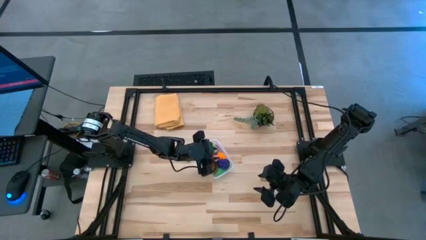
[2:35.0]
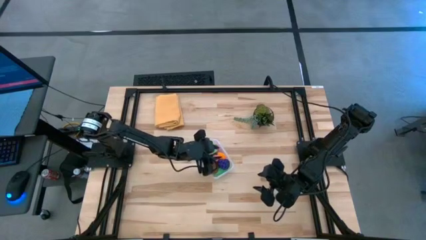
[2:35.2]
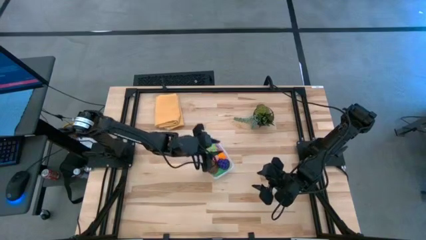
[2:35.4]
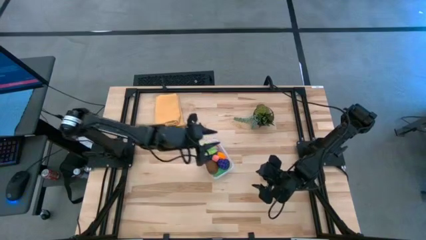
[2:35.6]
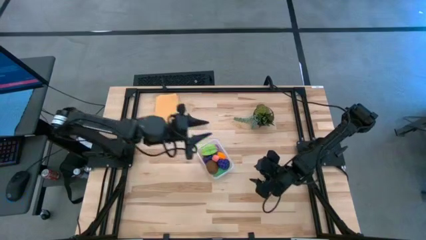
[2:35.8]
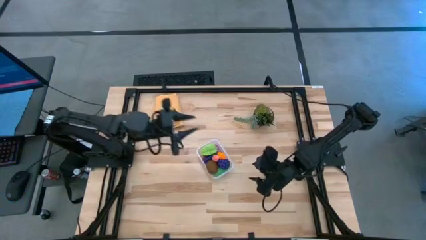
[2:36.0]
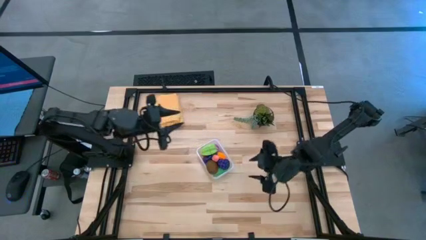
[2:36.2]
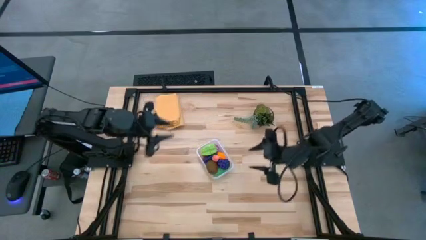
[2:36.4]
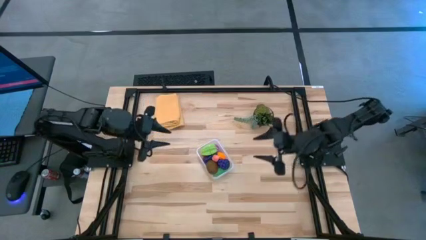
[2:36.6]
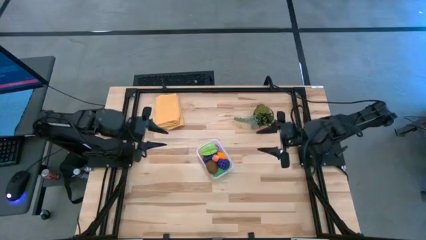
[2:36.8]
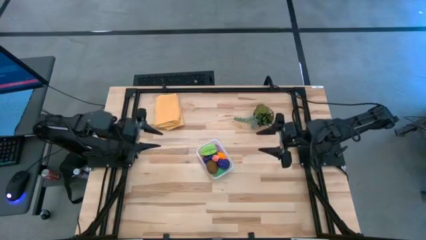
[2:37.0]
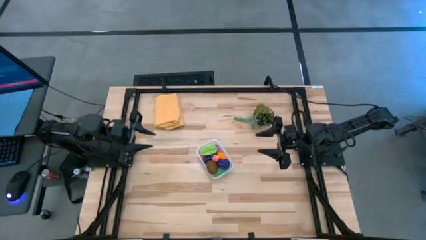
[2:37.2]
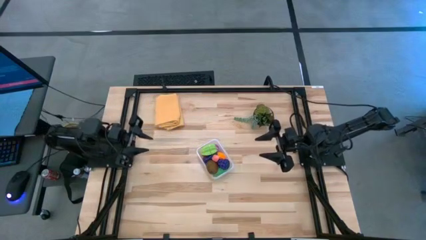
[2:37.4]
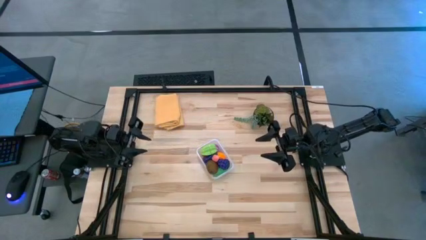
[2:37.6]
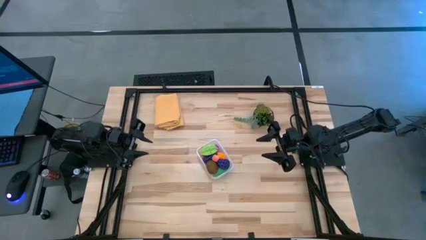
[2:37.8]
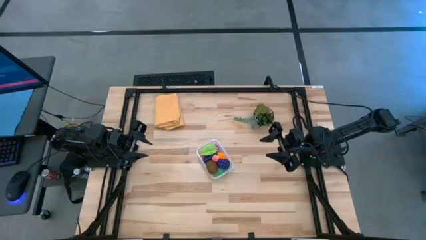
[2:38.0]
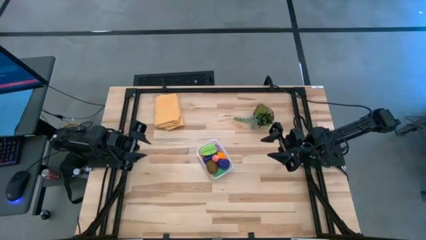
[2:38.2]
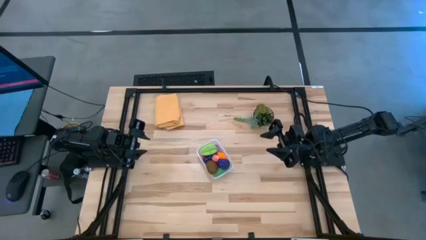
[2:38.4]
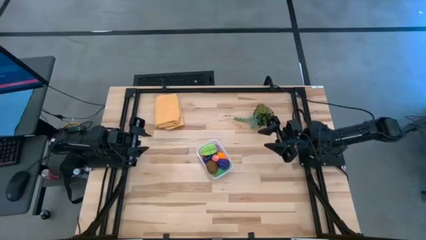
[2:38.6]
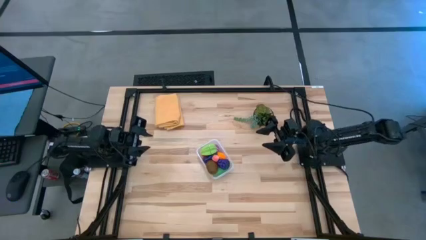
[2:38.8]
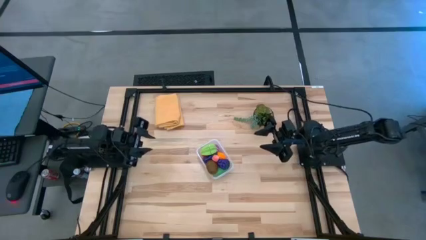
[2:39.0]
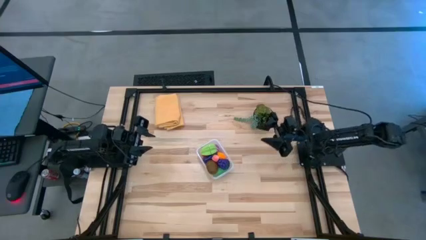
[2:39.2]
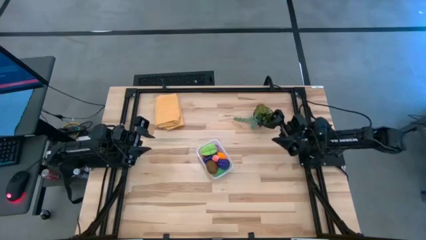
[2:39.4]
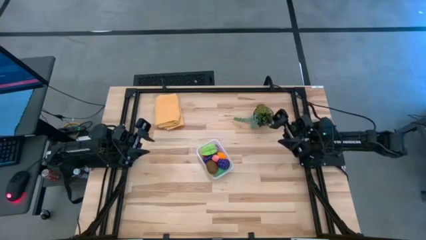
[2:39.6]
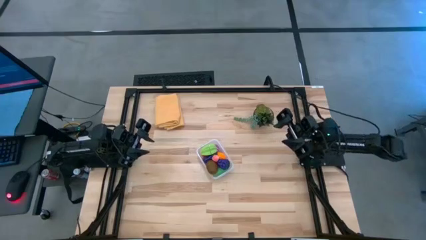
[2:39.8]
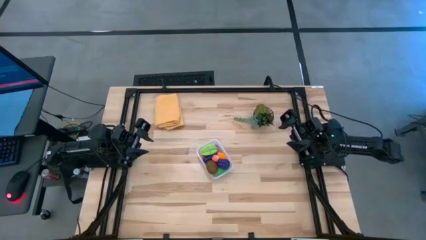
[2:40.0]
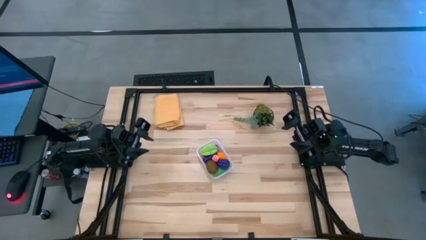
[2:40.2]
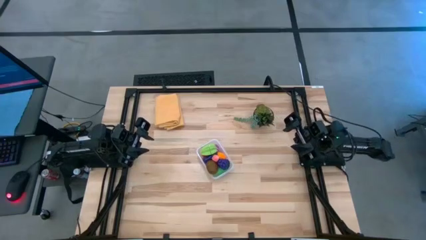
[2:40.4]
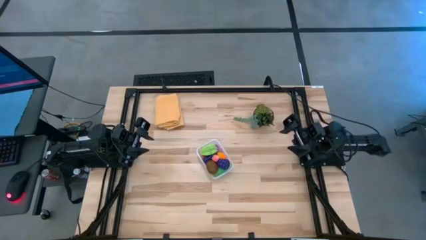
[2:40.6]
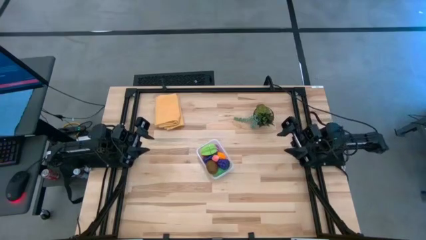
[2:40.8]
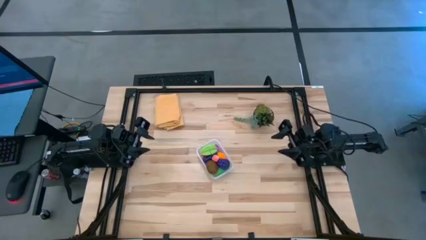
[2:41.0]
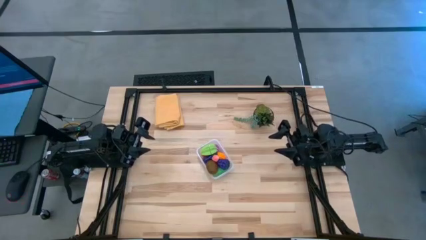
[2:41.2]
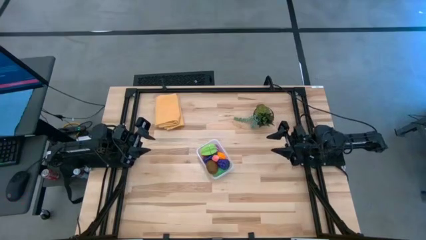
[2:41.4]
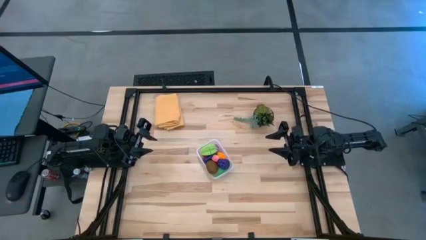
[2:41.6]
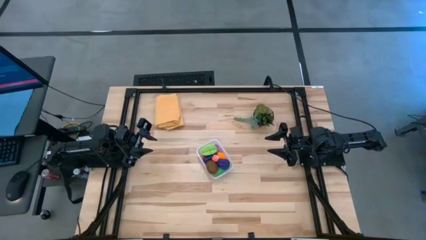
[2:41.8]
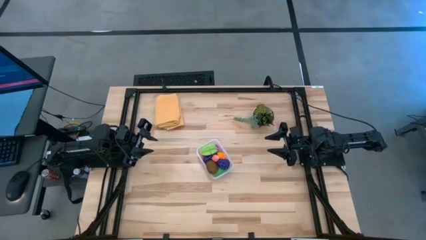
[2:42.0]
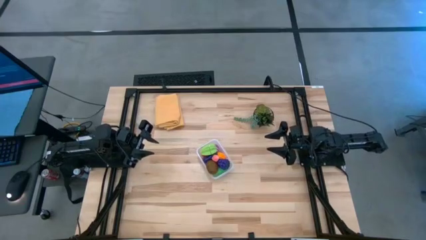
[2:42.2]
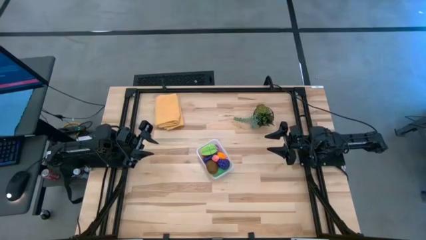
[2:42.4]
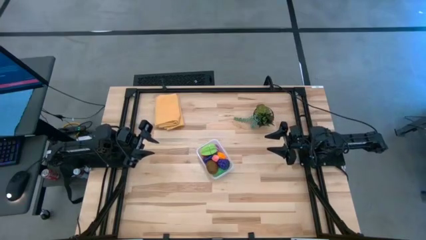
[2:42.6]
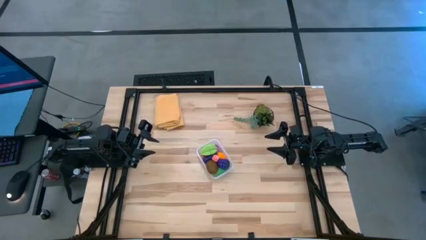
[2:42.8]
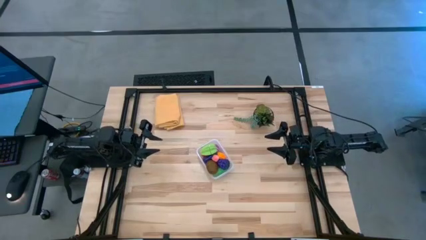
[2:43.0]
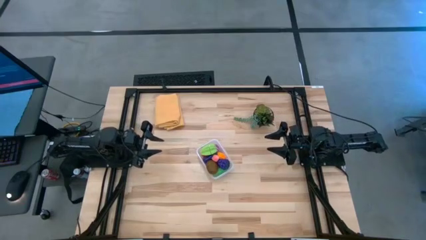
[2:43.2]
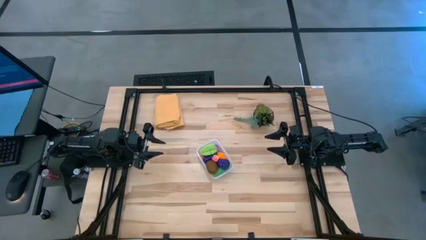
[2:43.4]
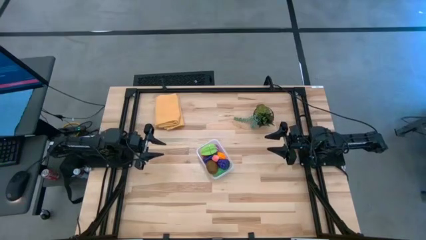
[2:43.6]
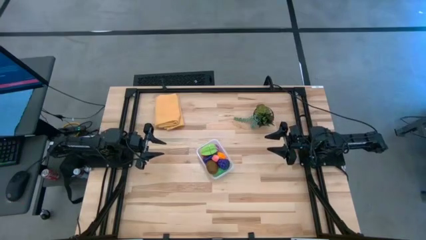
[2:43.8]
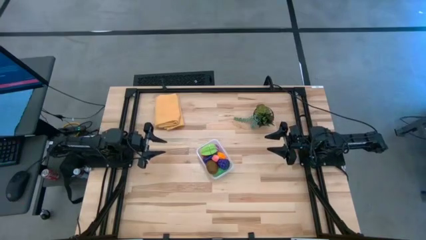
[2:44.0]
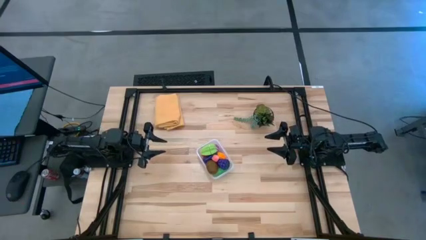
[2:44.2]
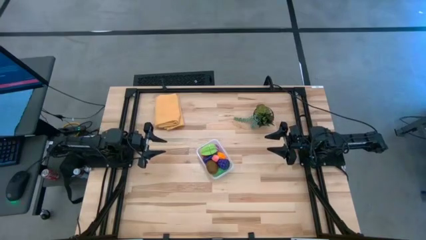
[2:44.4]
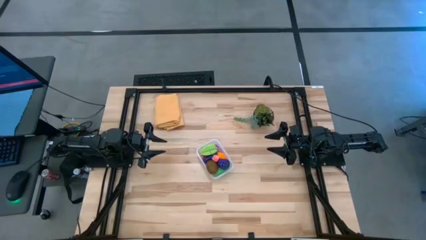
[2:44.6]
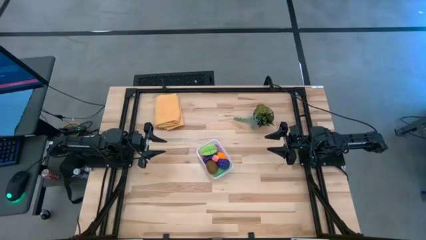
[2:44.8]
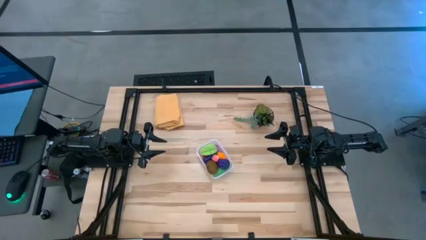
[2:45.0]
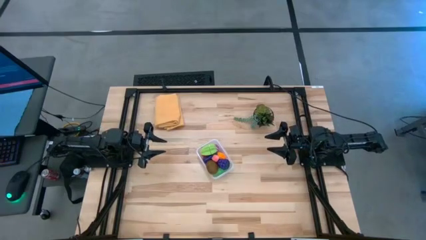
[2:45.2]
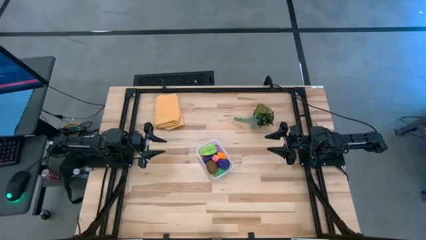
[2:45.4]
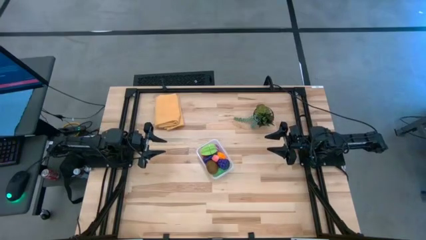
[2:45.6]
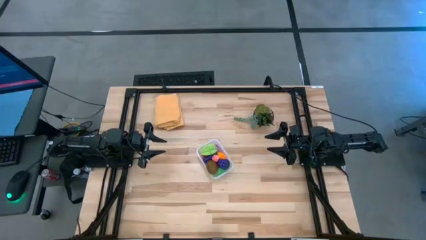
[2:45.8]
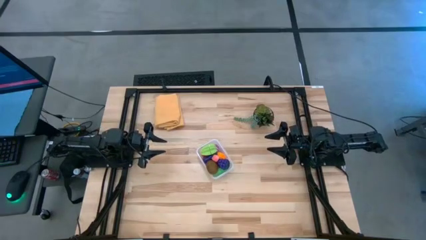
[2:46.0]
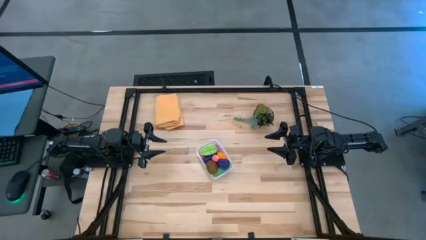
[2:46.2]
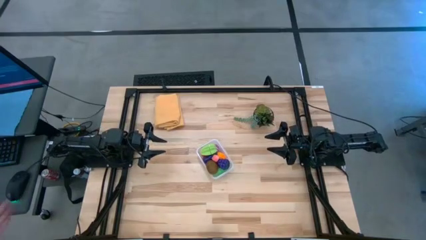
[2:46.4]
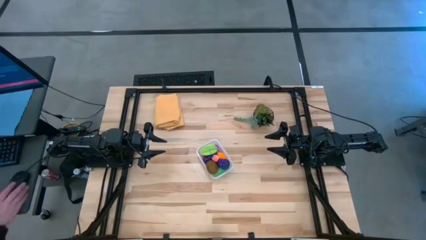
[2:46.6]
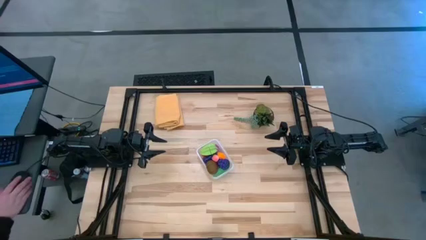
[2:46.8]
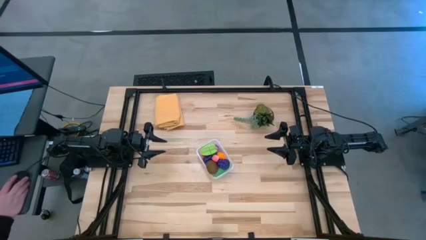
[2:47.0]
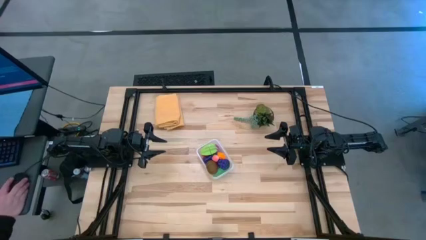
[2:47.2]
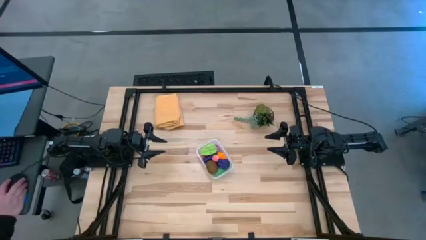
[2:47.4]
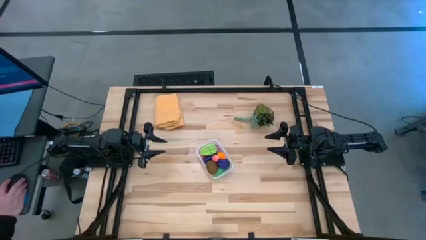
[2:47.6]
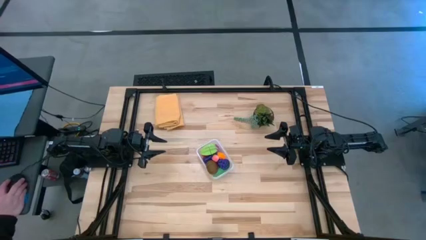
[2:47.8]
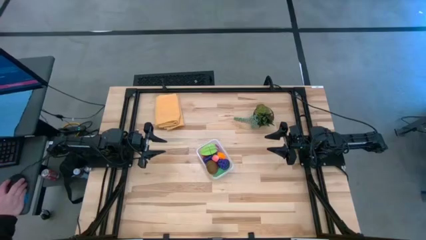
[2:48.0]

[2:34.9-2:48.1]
Task: Pick and placing Produce into tupperware
Return to Home Position
